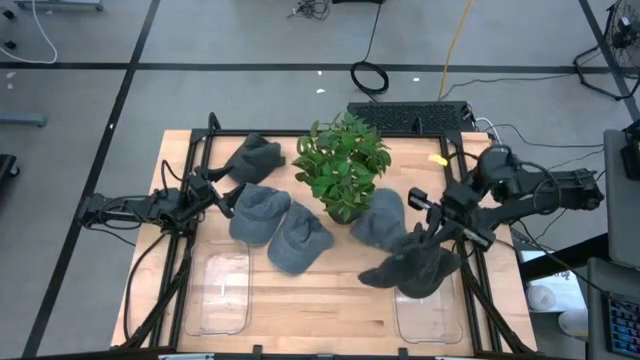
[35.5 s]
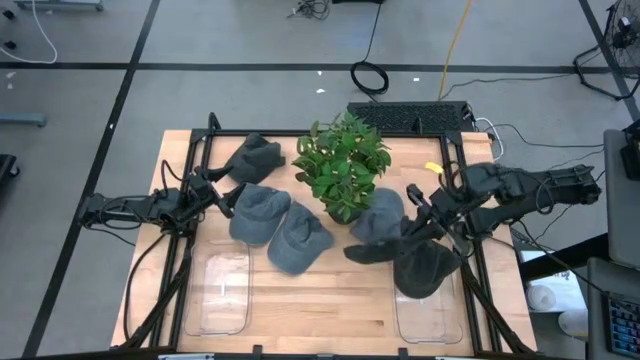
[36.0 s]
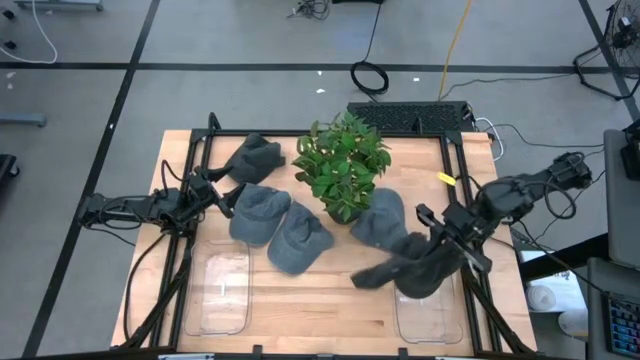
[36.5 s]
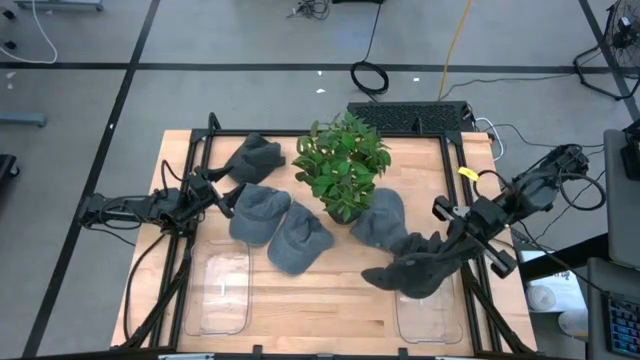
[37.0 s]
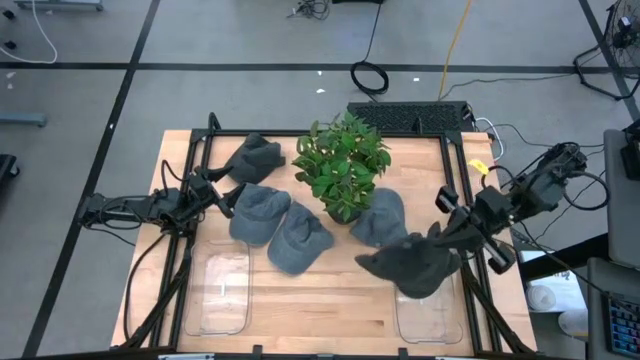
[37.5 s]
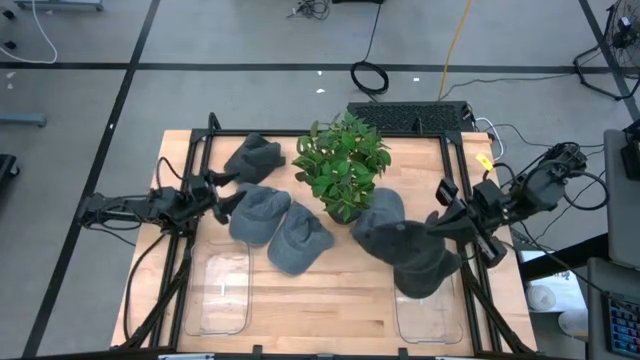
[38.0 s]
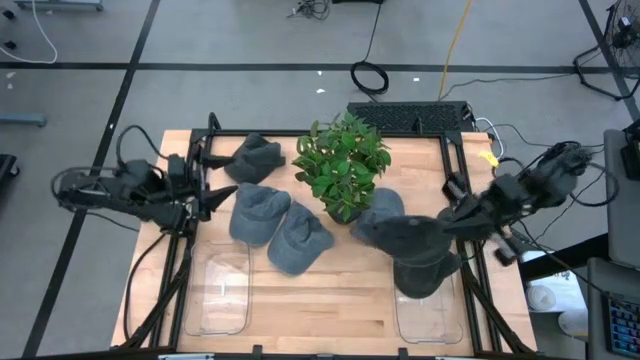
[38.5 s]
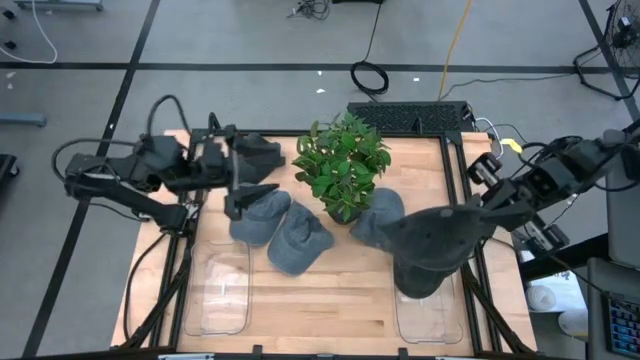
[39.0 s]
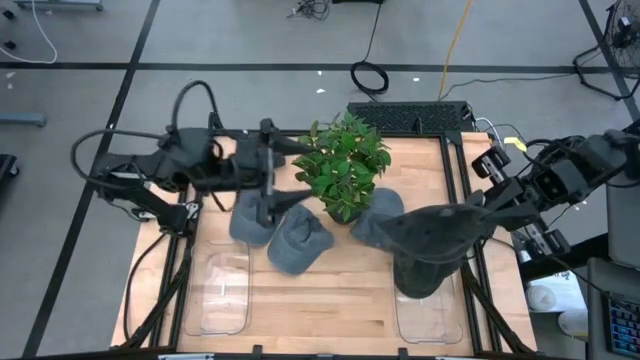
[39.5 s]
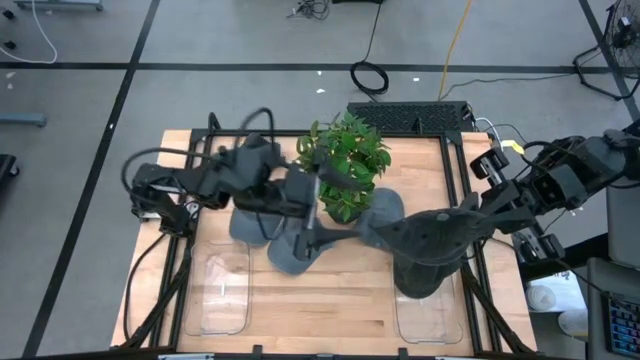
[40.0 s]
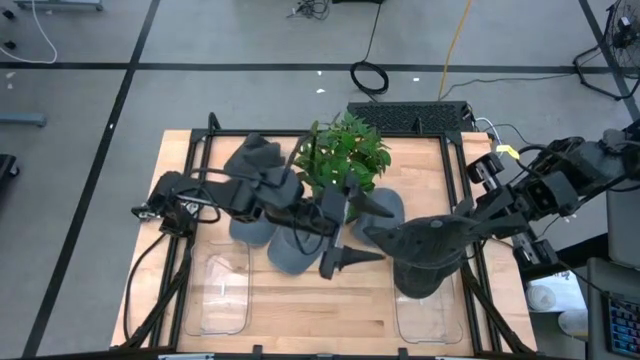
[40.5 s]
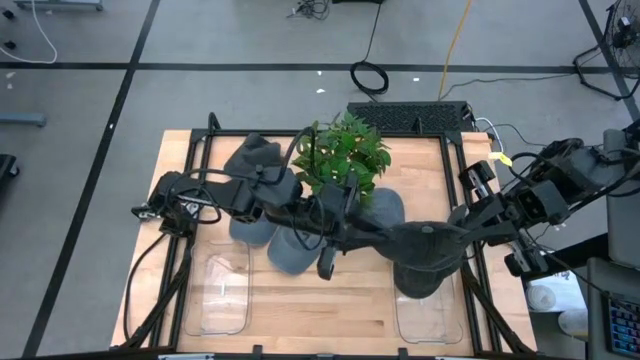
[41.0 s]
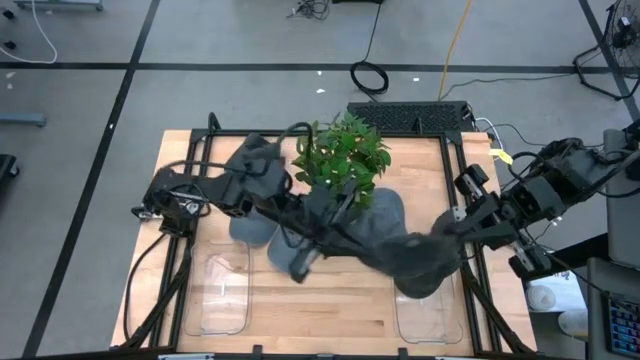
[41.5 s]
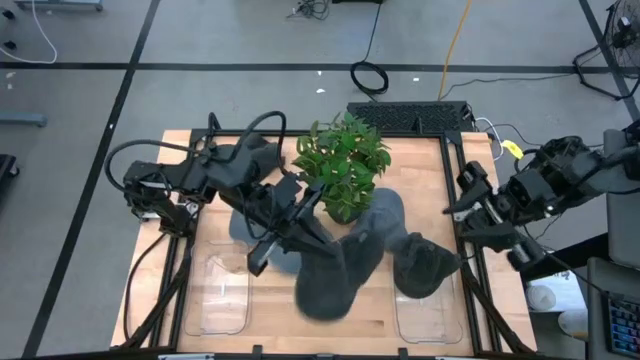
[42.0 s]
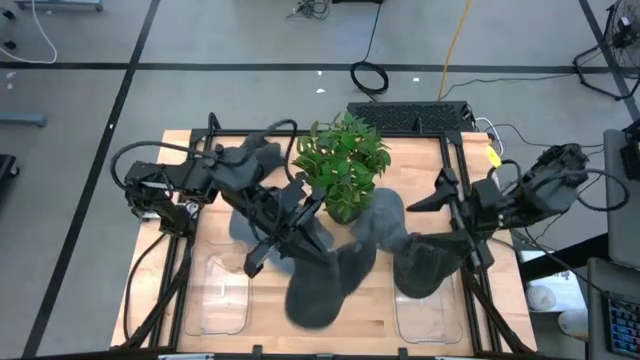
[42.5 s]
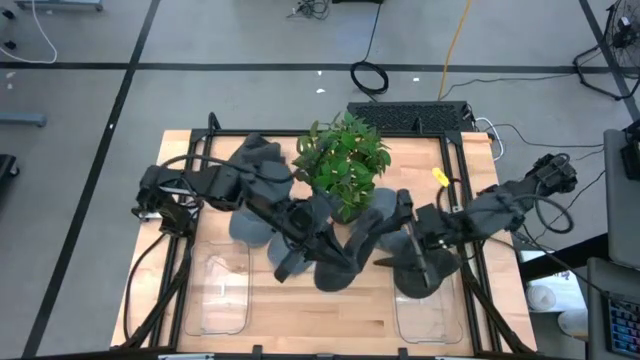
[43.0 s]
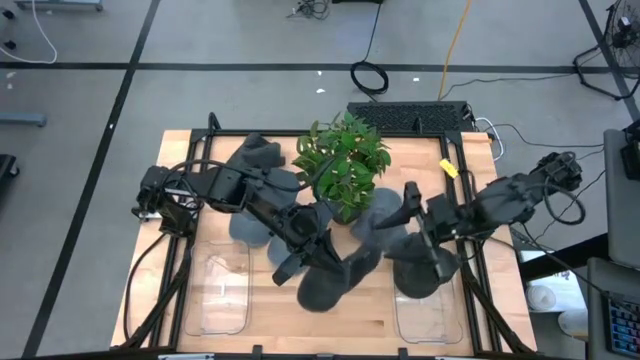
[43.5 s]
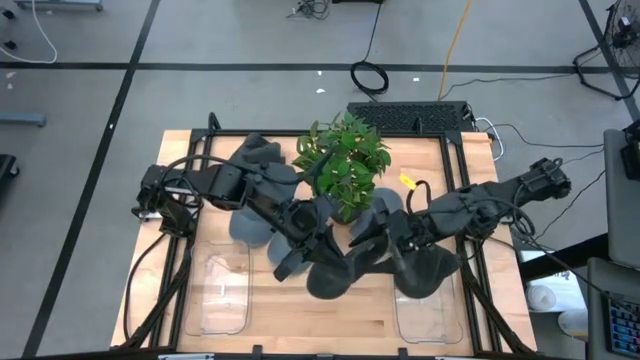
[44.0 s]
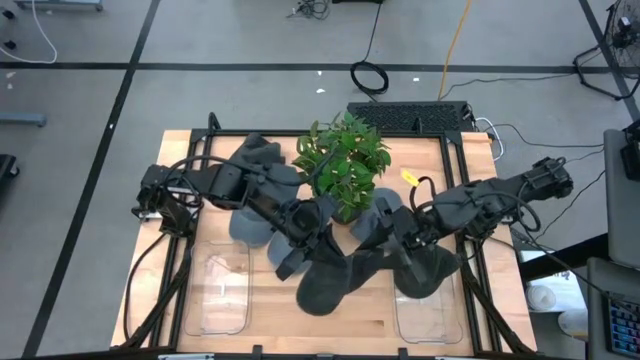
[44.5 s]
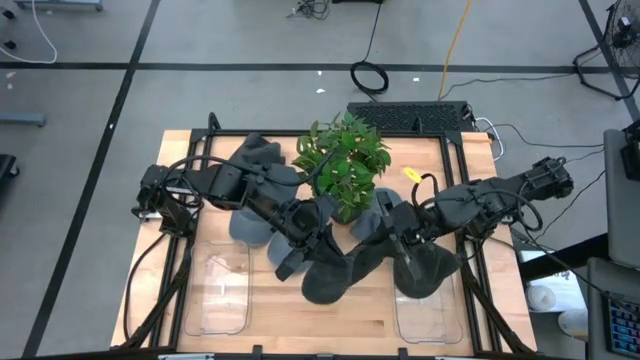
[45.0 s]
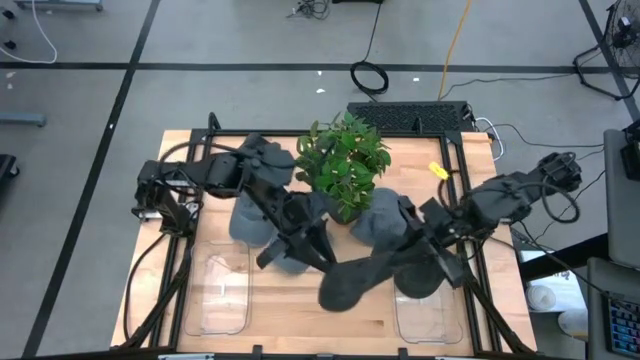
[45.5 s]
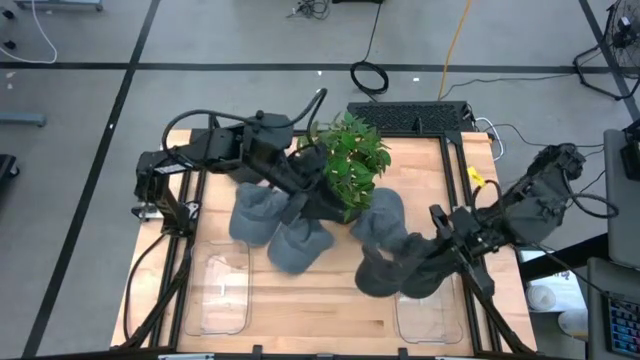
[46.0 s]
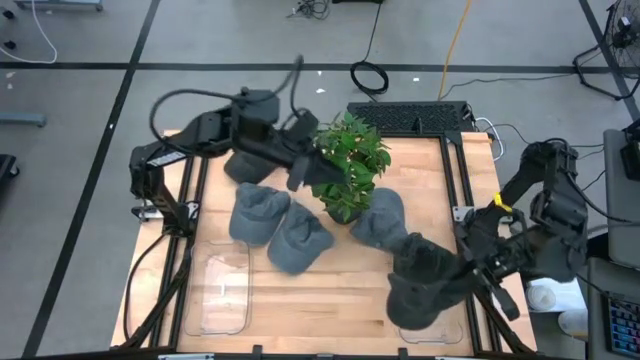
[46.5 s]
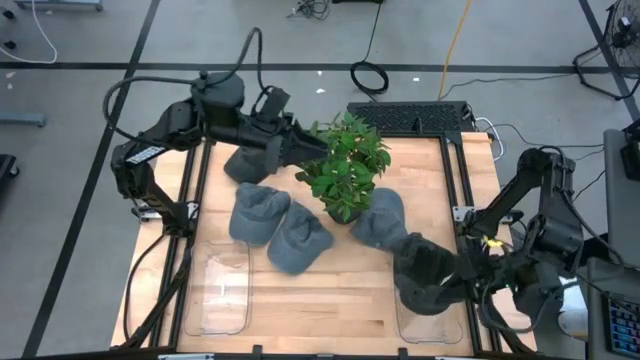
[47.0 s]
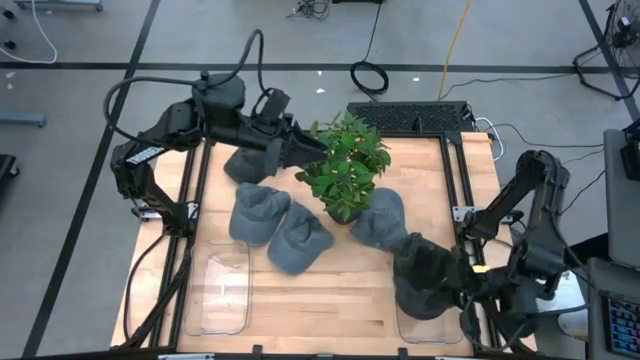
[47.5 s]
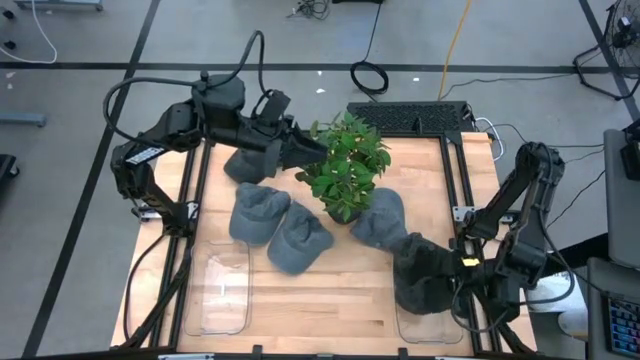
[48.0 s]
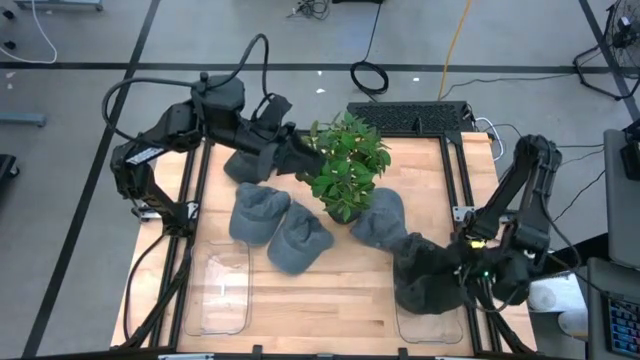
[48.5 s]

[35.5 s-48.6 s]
Task: Pick & Place hat
Put the right black cap into the right transparent bin

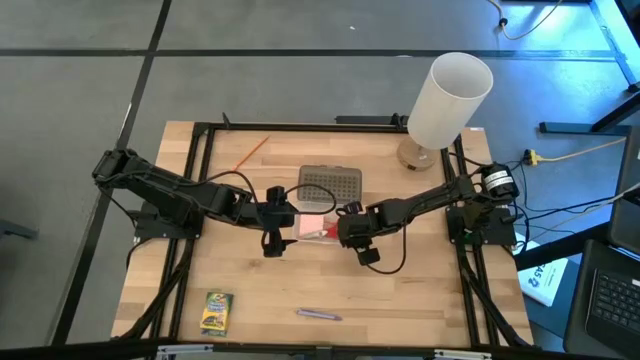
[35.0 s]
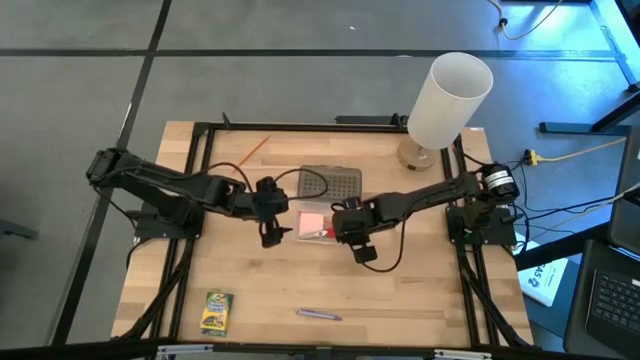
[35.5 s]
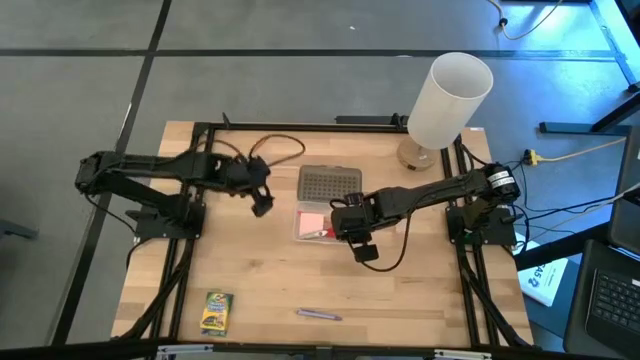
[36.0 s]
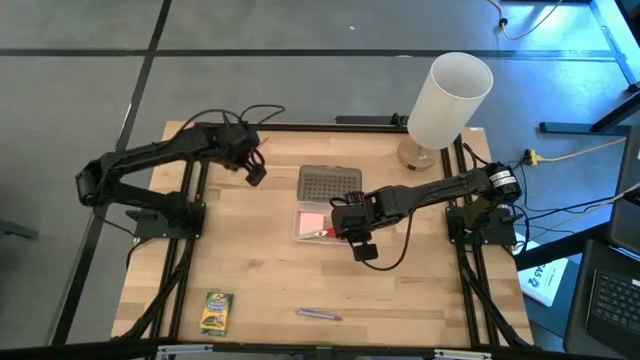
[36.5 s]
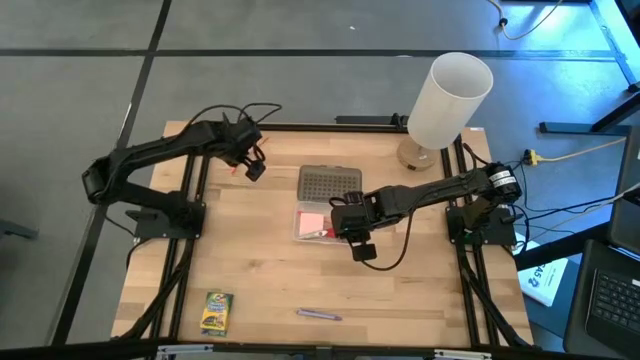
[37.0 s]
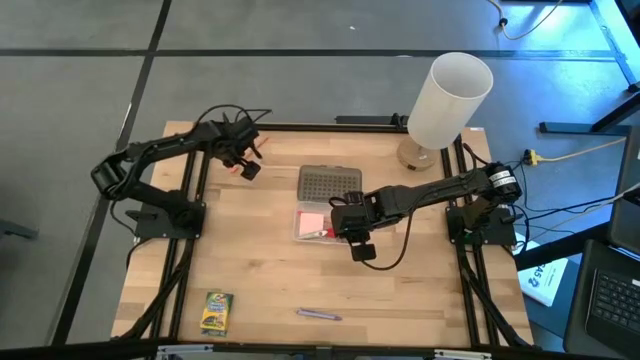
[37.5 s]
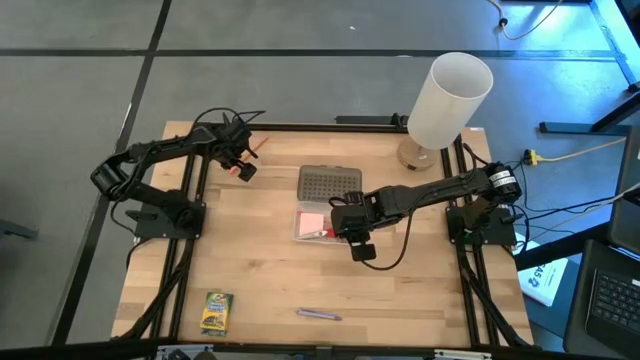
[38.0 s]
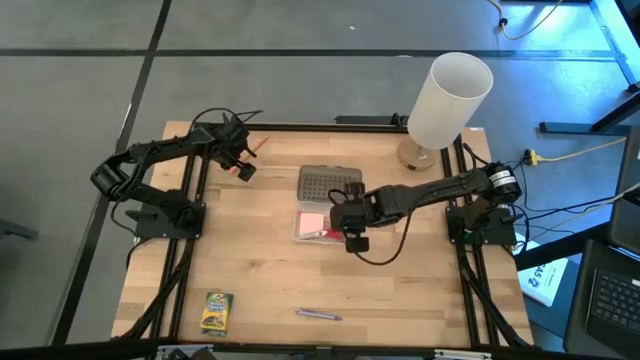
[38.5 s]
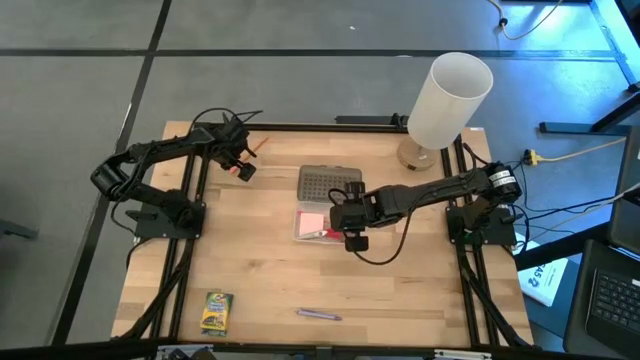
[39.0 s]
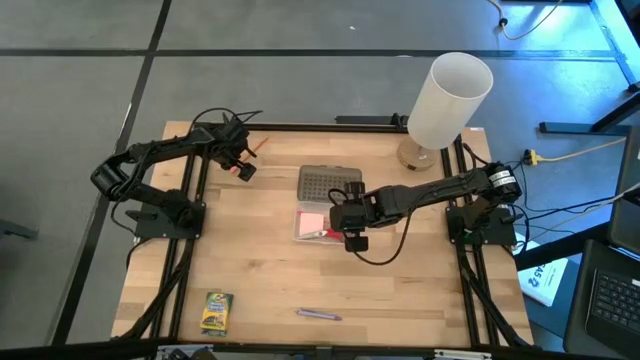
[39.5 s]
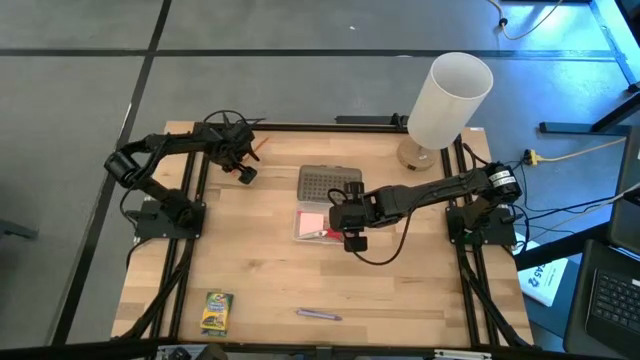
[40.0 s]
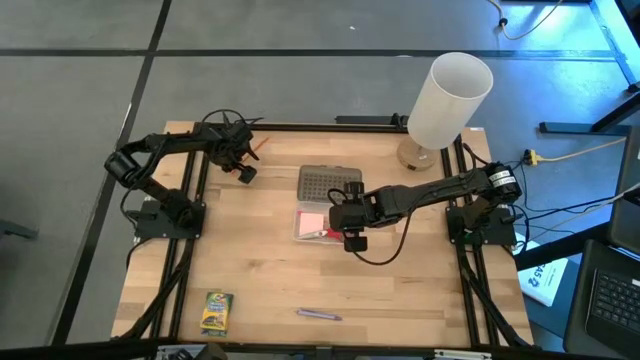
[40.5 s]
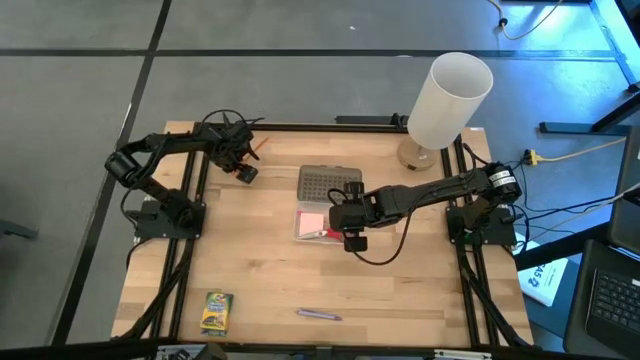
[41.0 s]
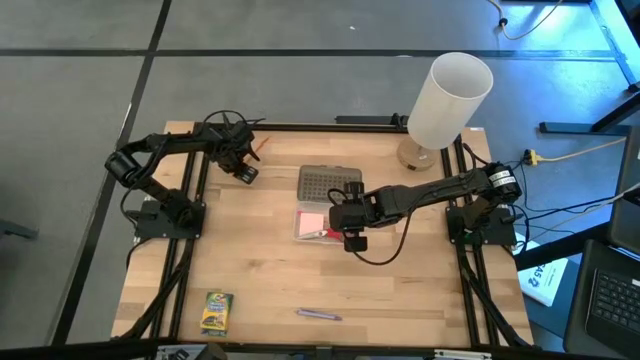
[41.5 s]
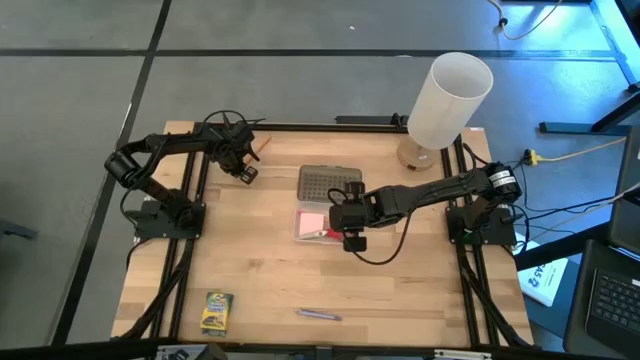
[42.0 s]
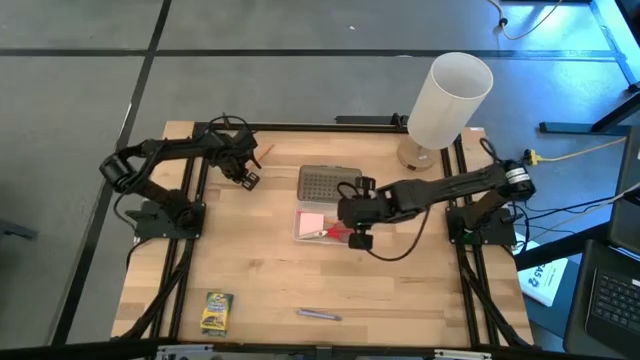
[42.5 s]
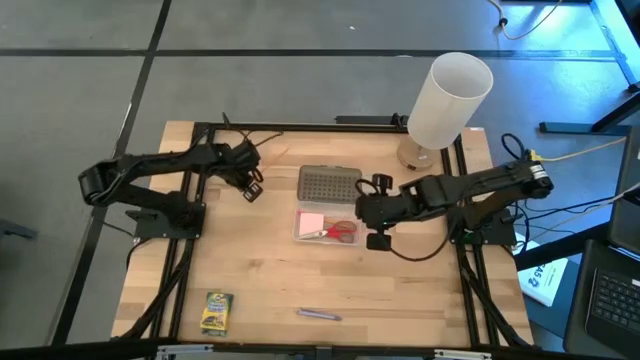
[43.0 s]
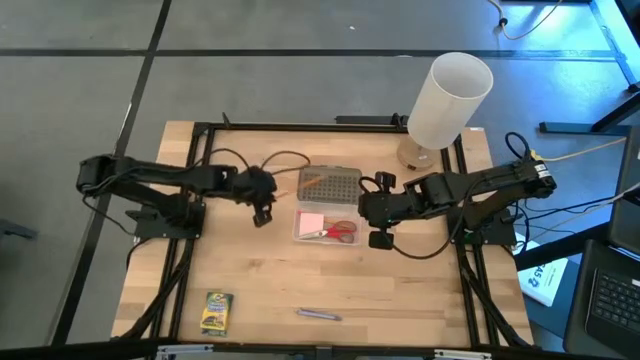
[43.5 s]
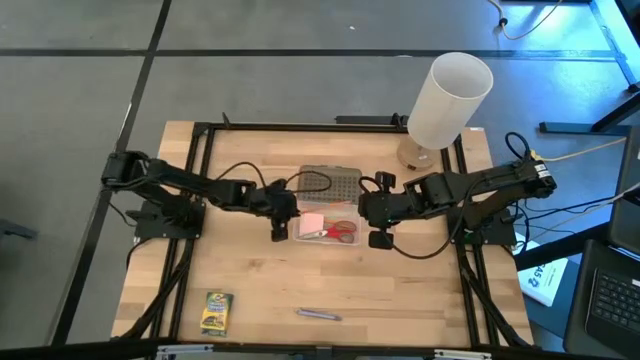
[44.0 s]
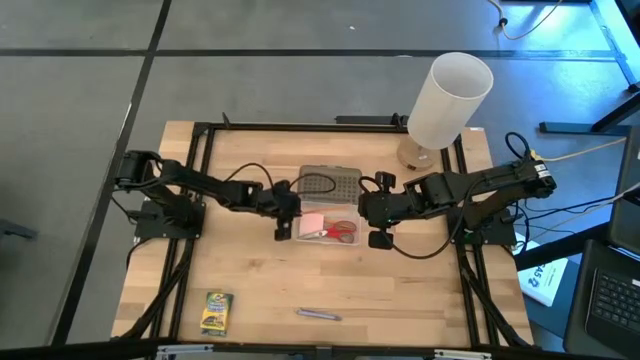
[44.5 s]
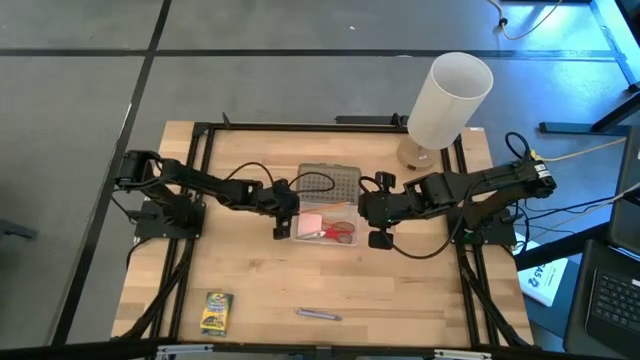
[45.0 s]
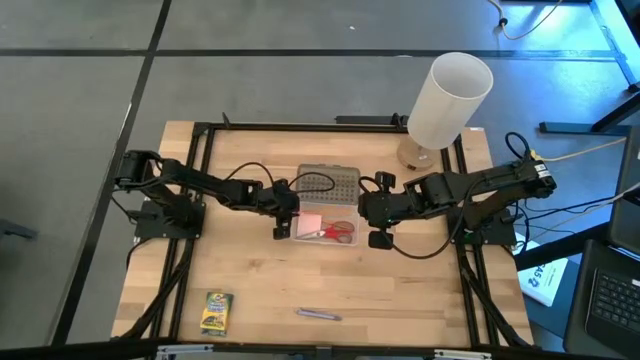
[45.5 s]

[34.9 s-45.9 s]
Task: Pack school essentials
Put the orange pencil into the supply box
